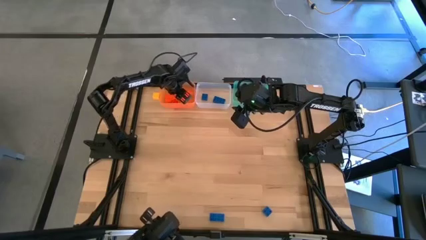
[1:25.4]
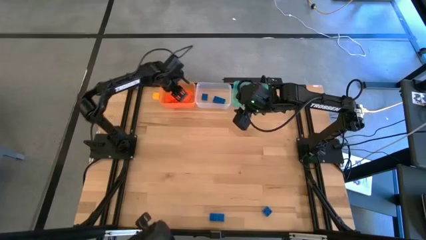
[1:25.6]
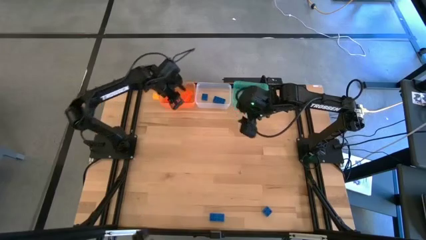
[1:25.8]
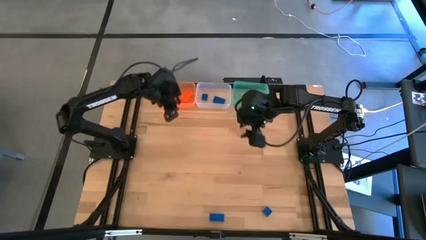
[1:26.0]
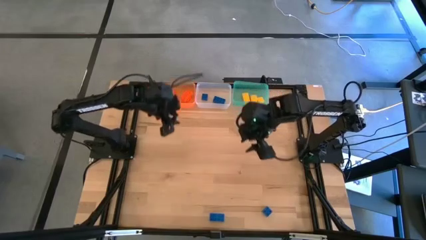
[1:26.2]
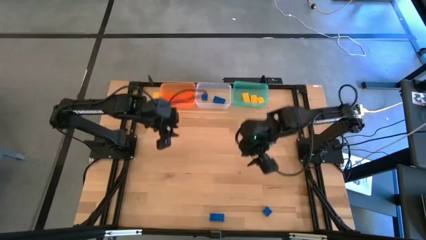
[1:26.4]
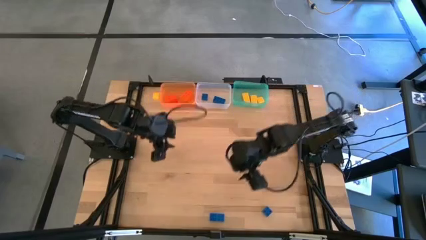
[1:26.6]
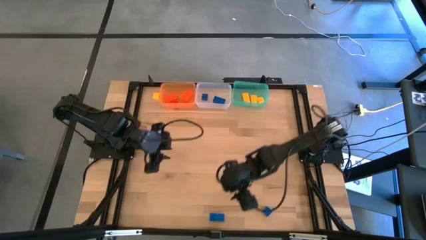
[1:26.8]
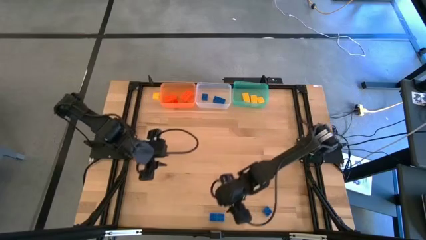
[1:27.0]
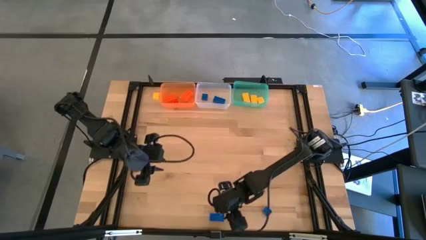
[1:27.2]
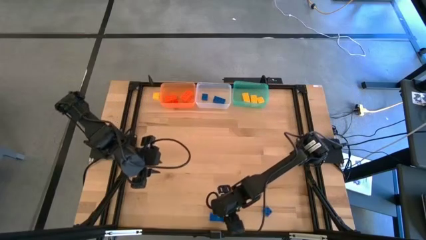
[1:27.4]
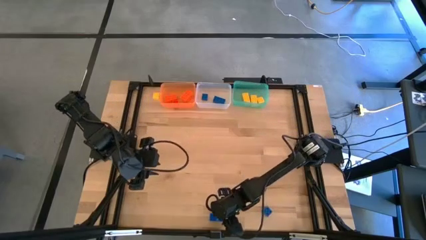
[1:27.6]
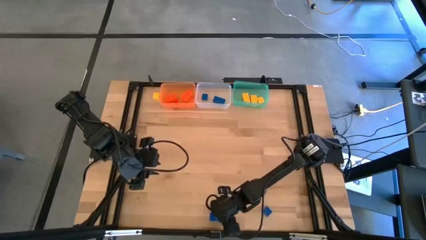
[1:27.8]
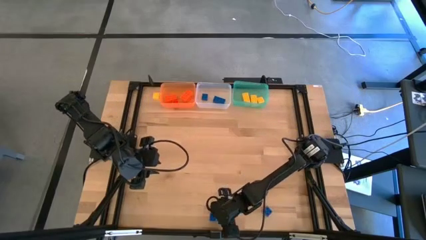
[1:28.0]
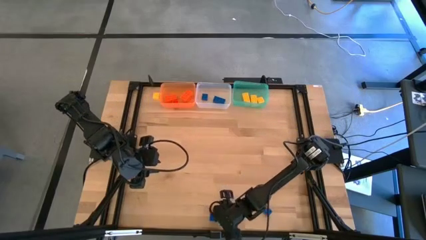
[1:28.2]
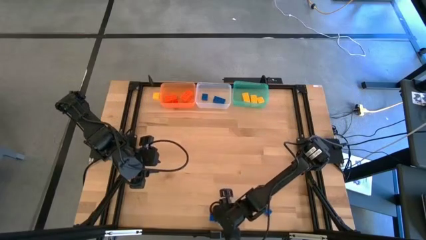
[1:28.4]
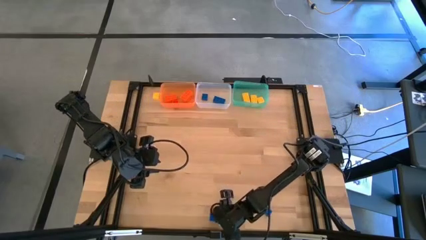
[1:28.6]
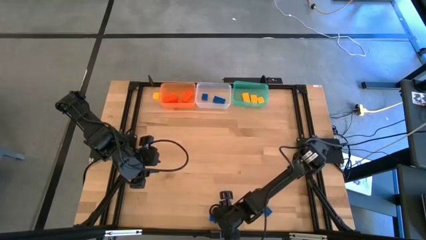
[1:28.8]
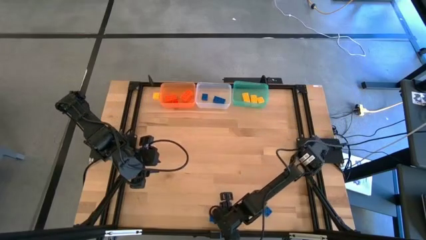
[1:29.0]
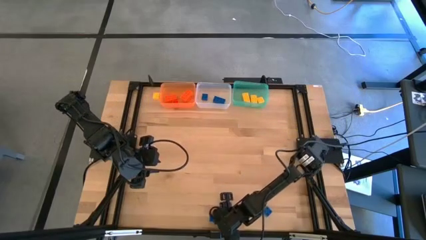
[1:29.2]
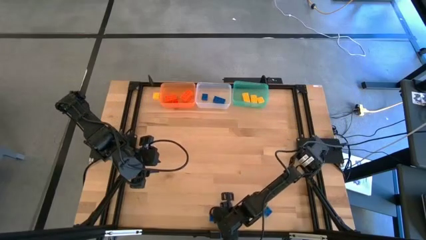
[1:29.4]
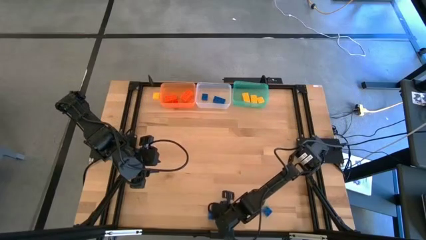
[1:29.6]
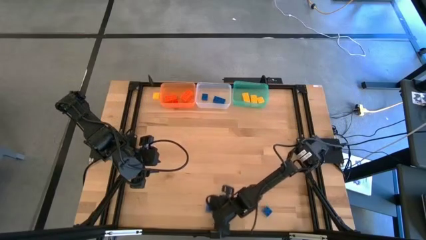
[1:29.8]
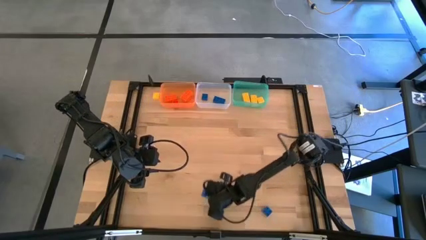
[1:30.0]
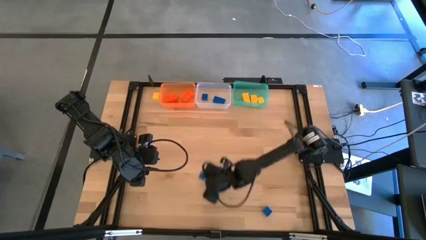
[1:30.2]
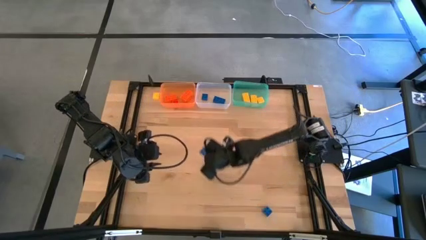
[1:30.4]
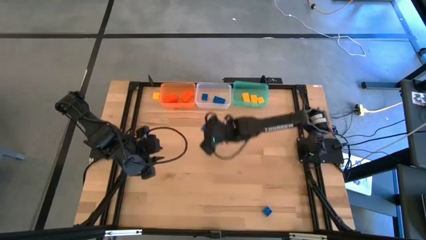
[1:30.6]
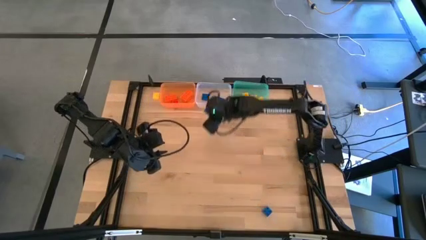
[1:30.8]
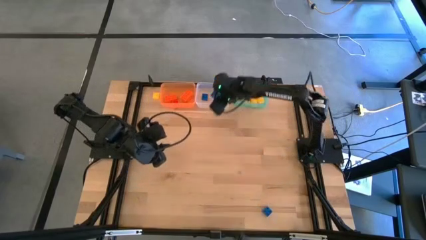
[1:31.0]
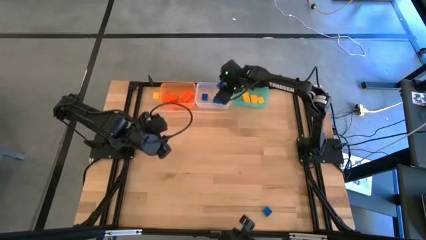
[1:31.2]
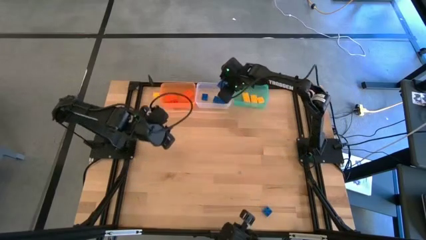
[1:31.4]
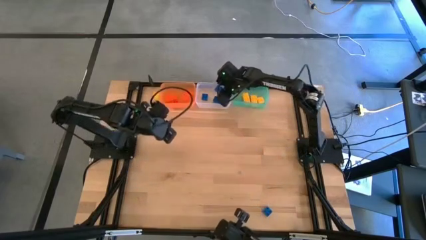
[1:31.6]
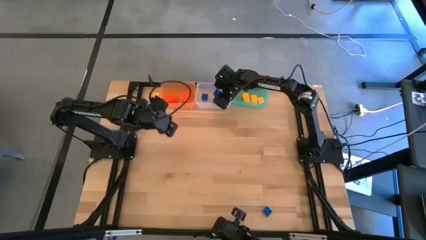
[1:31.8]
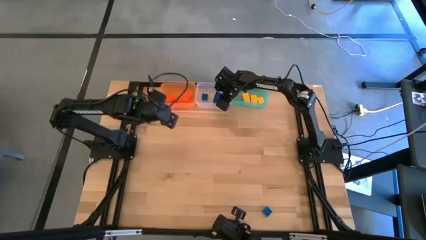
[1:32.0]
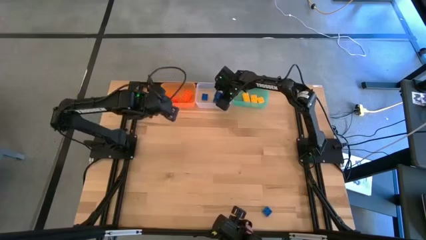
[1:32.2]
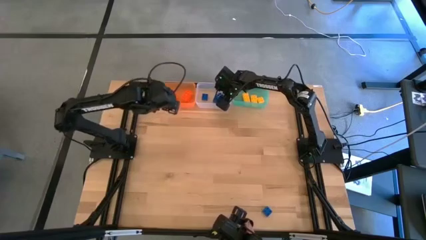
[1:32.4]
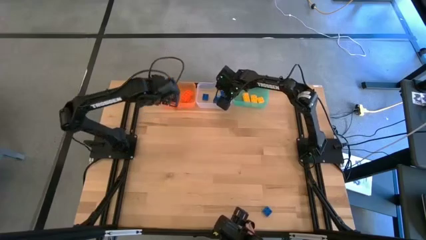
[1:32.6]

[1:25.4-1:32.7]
Task: Sort & place blocks by color
Put the blue game piece into the transparent bin

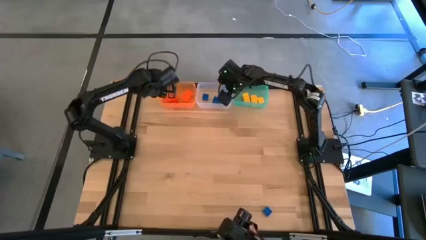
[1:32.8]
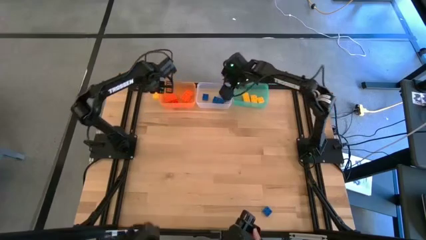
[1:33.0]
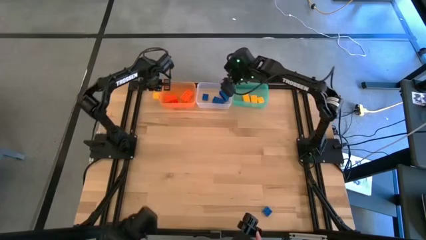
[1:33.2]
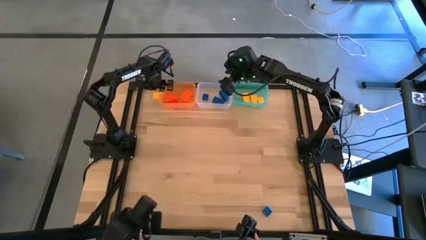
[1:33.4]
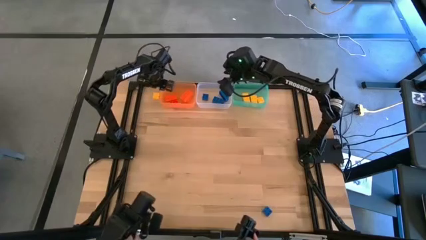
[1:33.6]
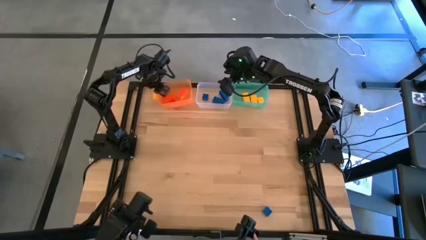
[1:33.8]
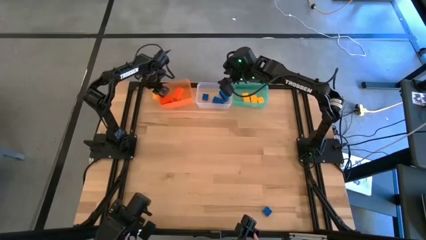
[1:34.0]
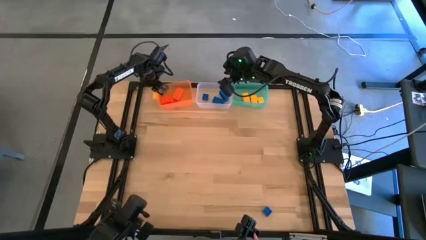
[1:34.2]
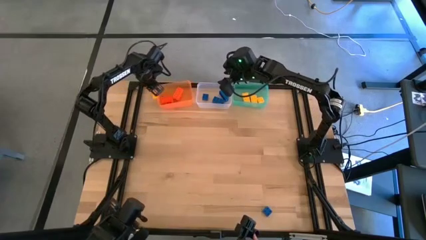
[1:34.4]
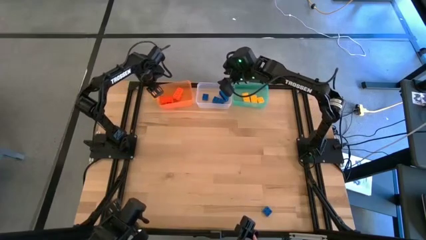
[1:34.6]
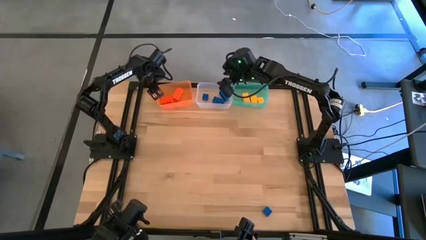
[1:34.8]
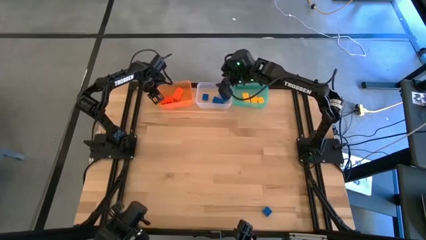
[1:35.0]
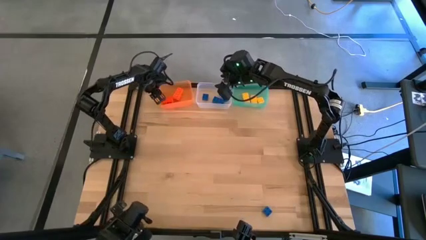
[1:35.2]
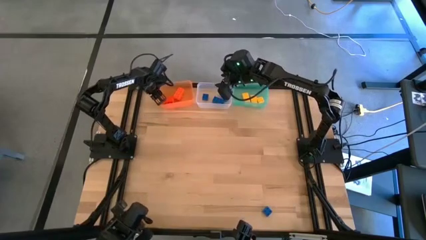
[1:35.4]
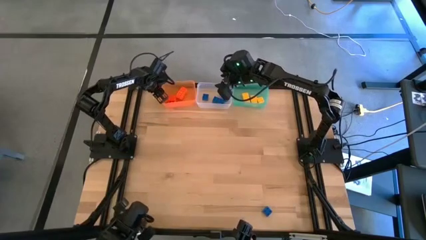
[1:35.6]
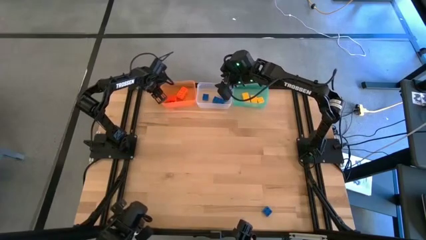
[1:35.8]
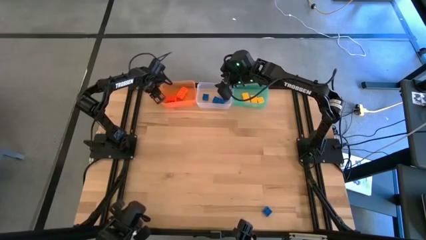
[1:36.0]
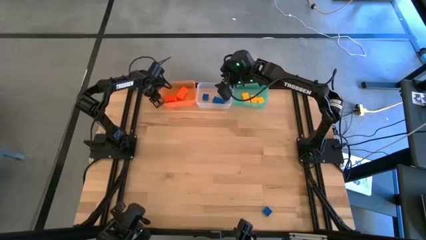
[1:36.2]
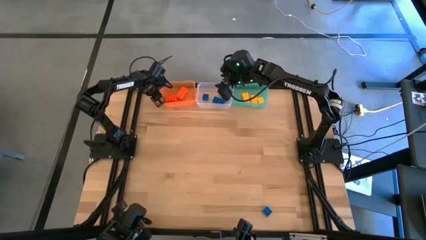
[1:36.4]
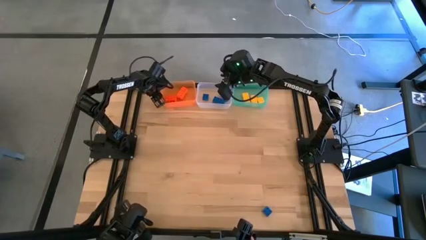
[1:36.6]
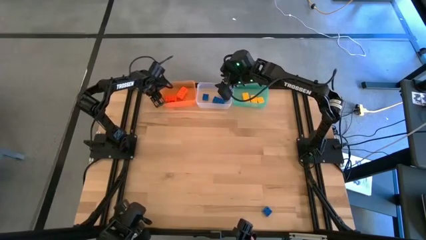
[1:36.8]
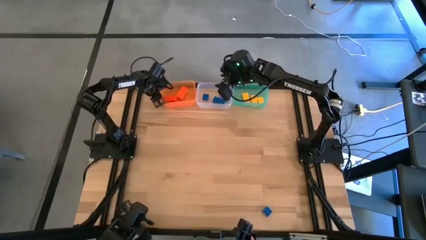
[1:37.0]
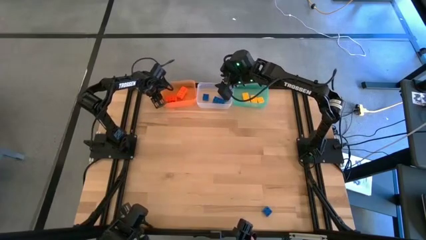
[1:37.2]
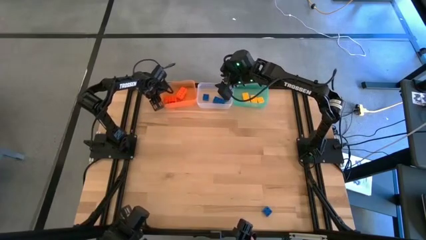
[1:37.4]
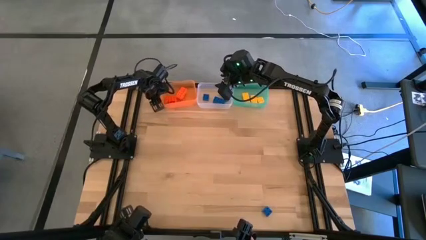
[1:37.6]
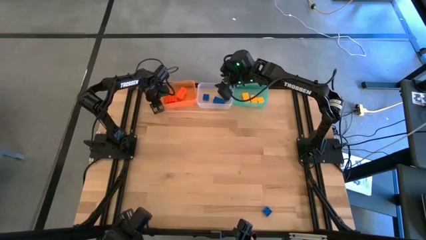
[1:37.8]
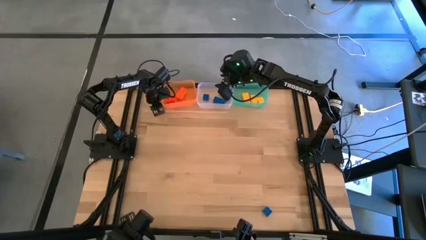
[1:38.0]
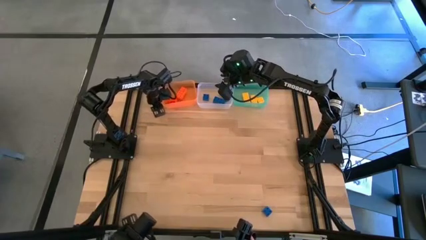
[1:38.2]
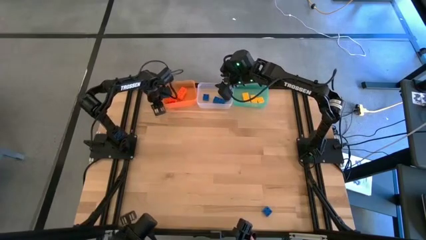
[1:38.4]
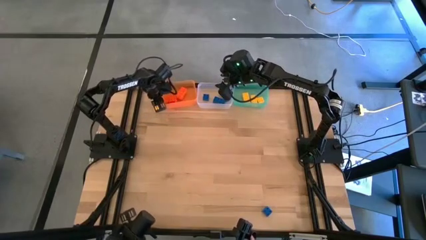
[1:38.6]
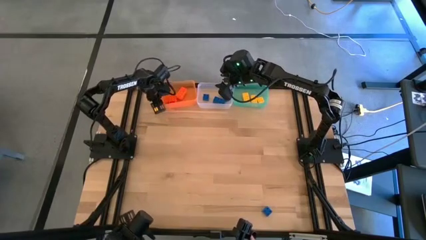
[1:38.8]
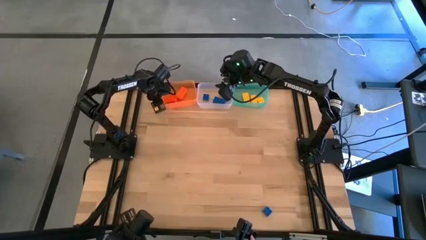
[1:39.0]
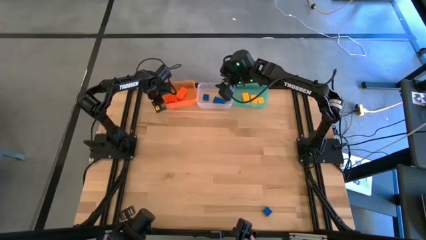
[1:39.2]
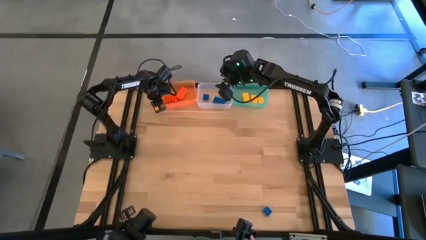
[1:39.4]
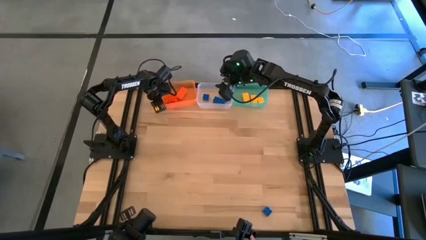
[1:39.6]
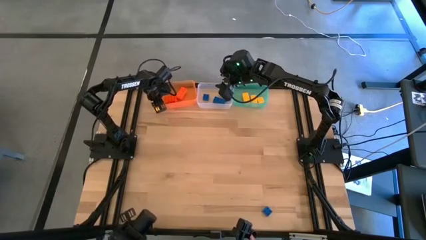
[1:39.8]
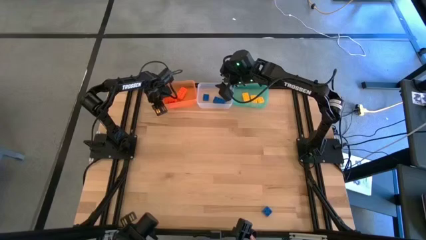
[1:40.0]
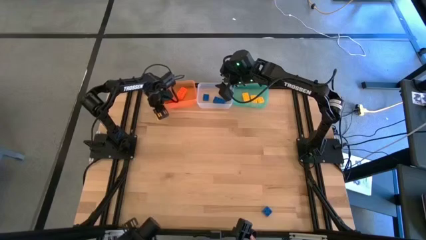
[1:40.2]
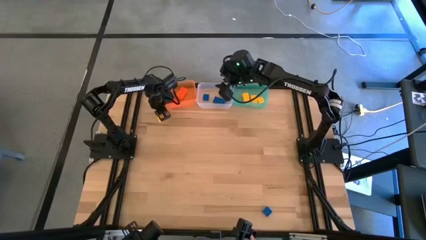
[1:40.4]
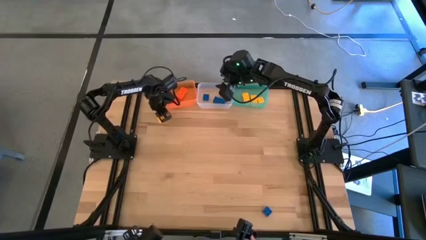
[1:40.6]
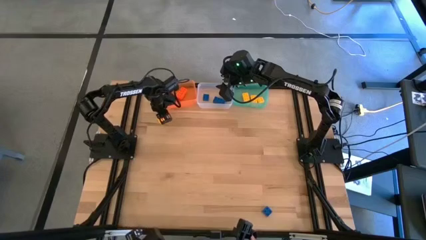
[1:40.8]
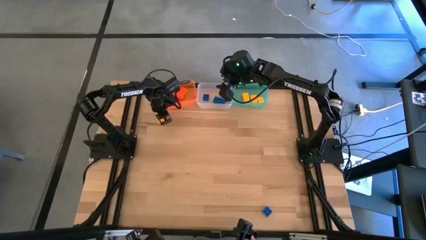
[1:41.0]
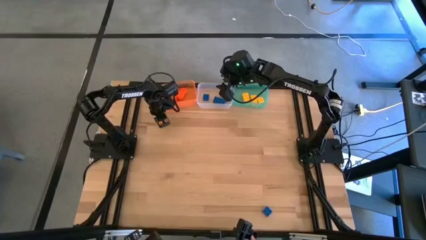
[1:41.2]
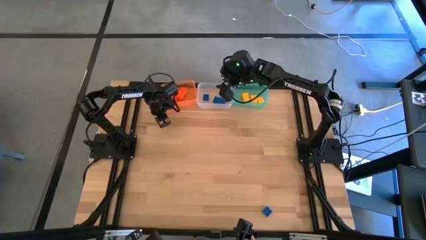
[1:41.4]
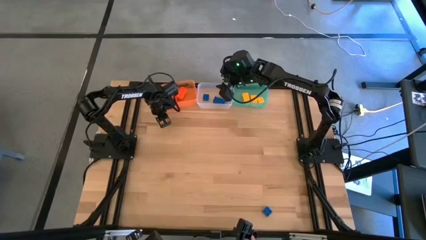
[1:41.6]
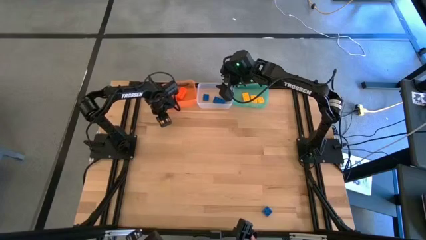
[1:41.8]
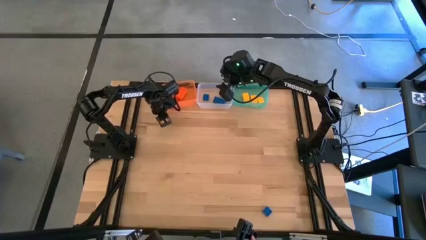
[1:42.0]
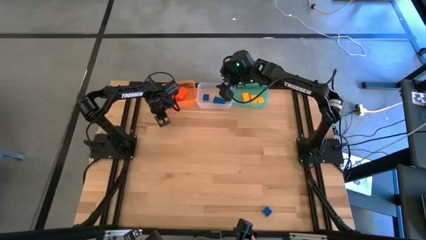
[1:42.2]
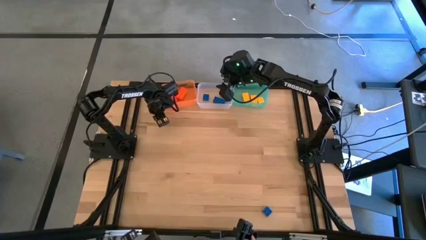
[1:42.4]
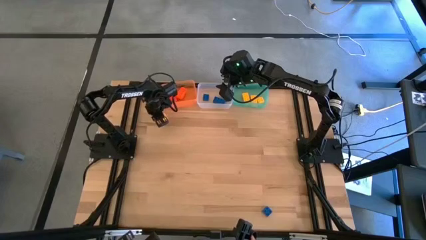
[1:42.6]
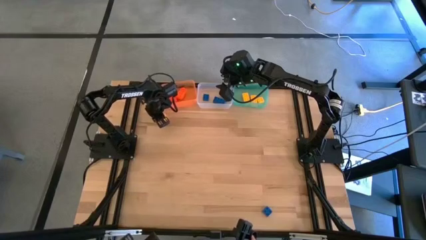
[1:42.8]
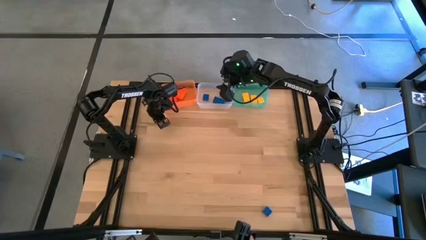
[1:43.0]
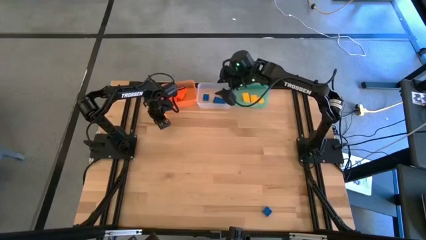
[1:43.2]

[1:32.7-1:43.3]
Put the yellow game piece into the green bin
